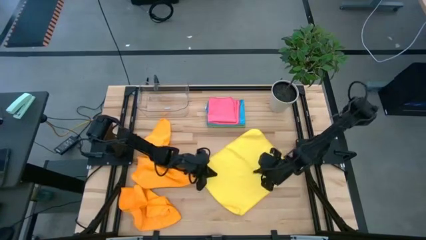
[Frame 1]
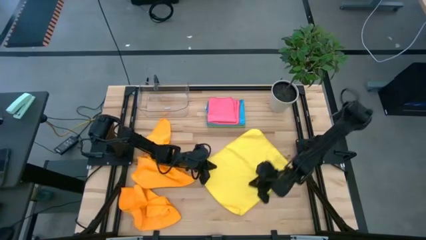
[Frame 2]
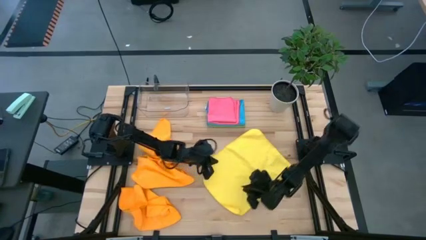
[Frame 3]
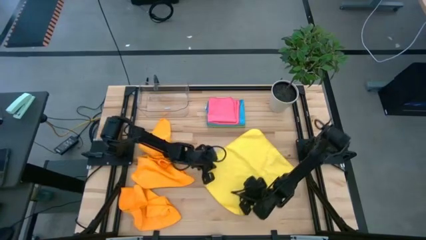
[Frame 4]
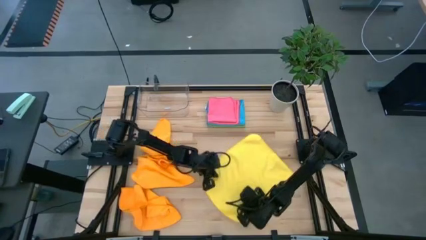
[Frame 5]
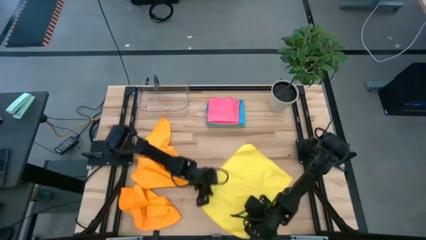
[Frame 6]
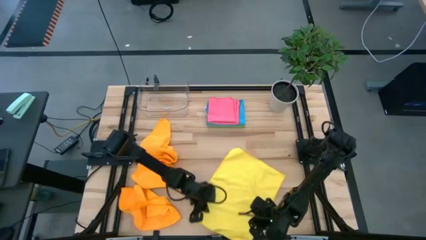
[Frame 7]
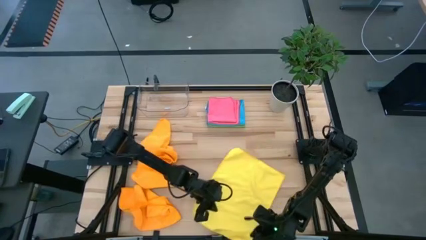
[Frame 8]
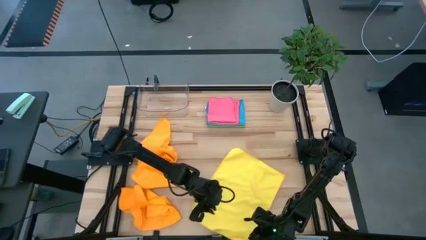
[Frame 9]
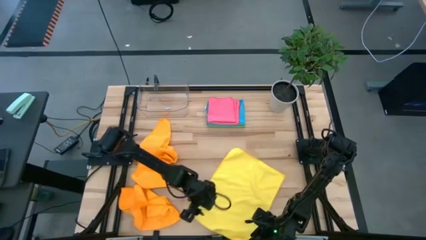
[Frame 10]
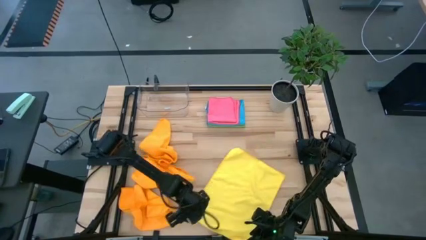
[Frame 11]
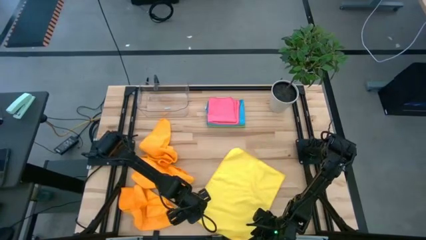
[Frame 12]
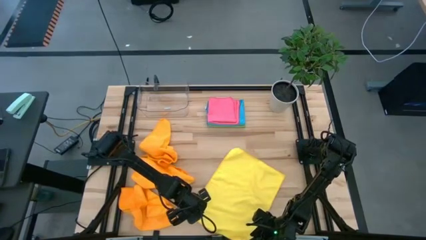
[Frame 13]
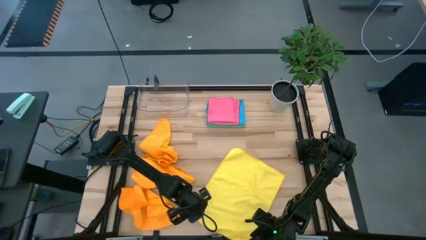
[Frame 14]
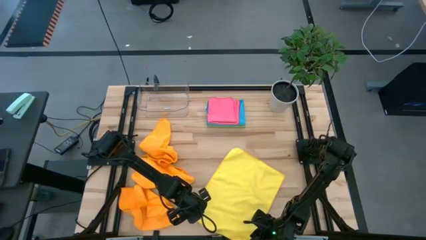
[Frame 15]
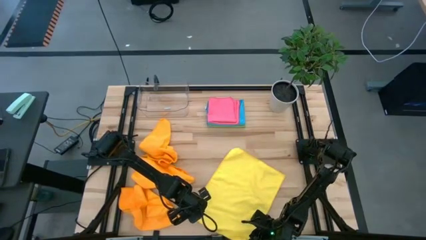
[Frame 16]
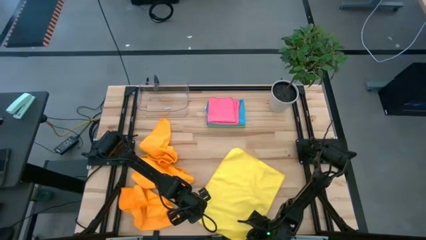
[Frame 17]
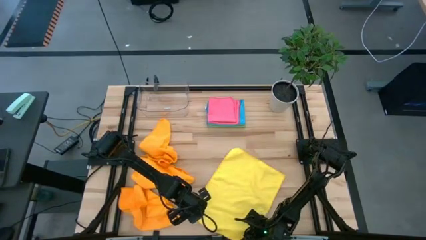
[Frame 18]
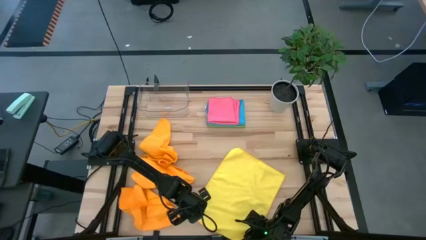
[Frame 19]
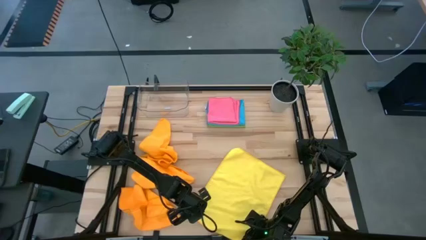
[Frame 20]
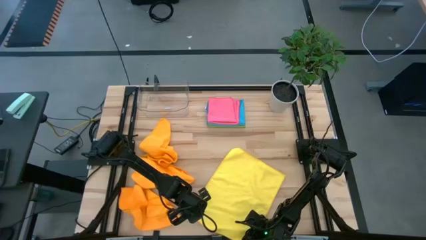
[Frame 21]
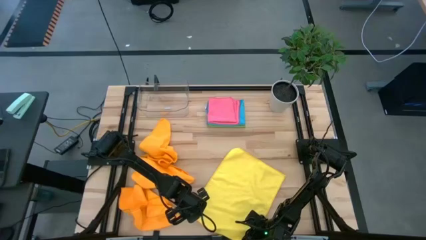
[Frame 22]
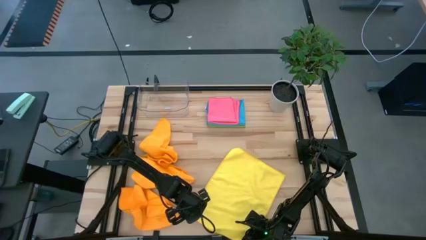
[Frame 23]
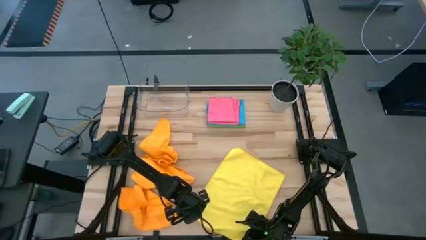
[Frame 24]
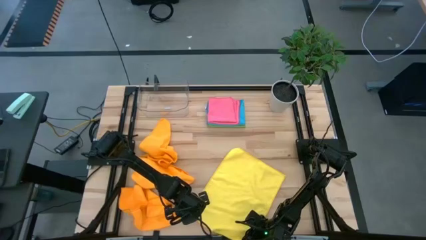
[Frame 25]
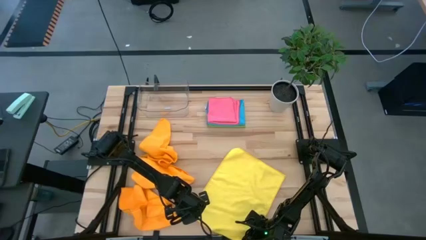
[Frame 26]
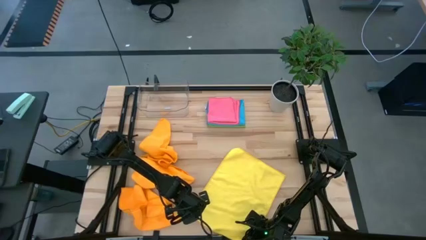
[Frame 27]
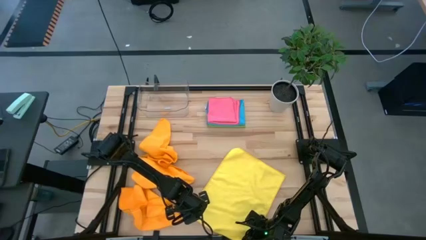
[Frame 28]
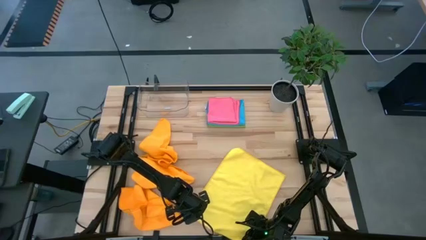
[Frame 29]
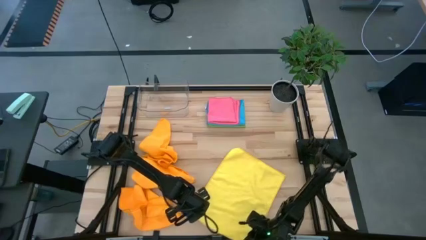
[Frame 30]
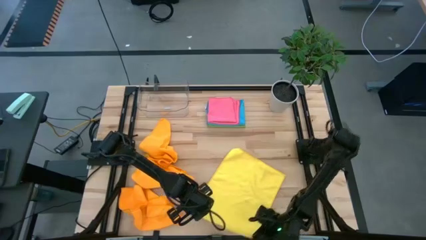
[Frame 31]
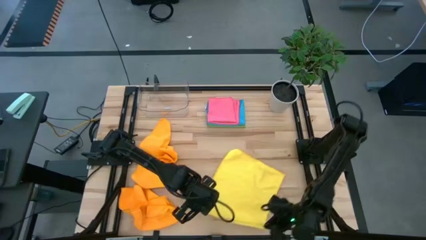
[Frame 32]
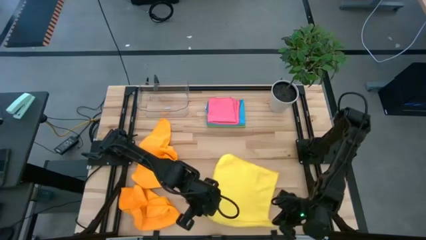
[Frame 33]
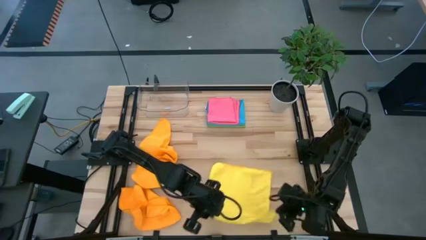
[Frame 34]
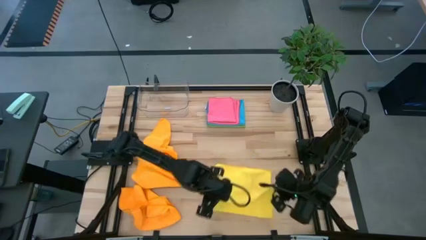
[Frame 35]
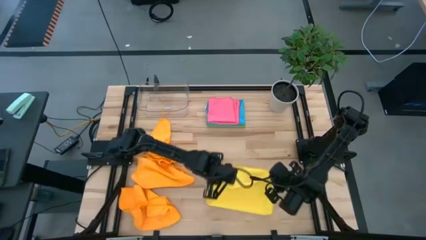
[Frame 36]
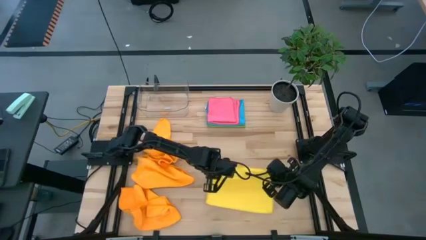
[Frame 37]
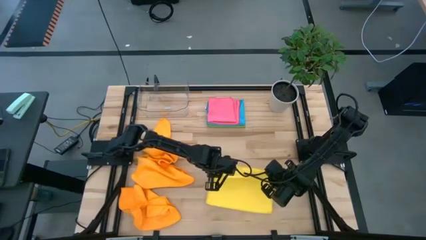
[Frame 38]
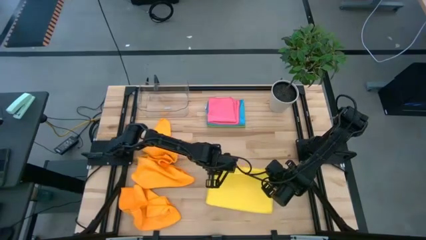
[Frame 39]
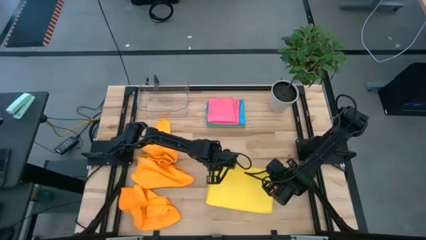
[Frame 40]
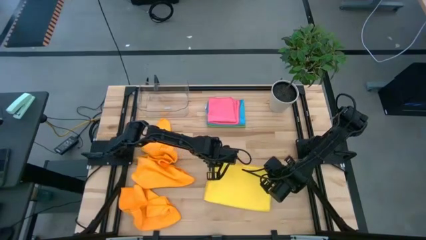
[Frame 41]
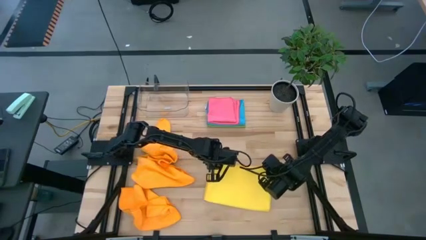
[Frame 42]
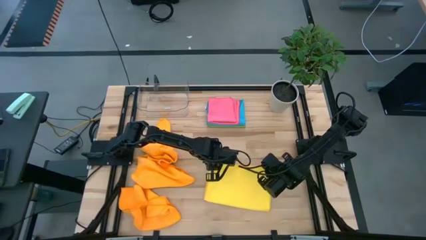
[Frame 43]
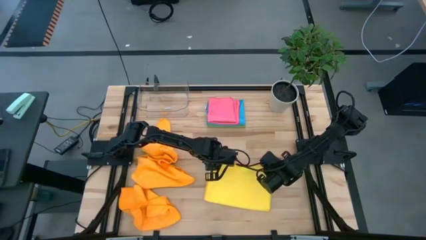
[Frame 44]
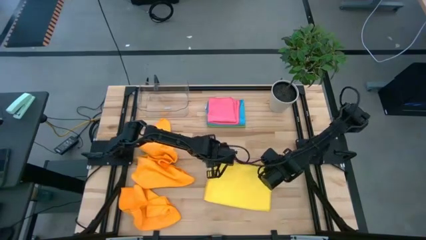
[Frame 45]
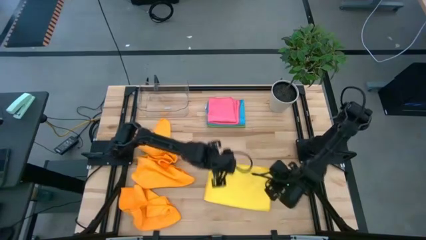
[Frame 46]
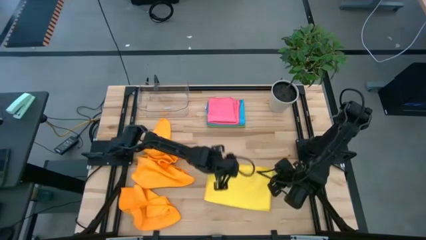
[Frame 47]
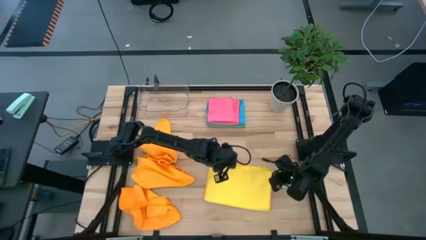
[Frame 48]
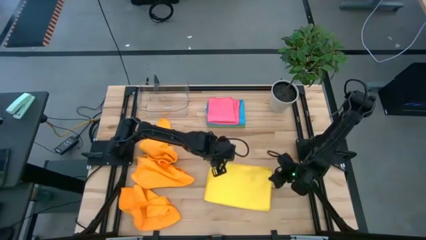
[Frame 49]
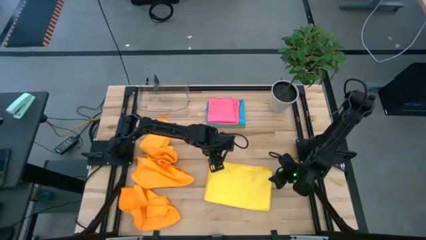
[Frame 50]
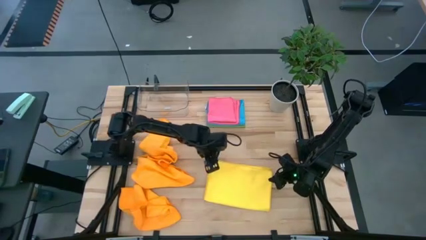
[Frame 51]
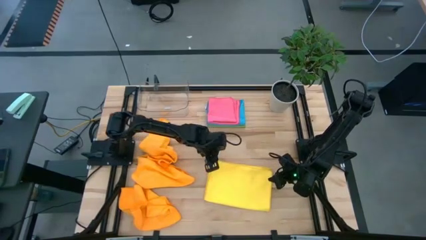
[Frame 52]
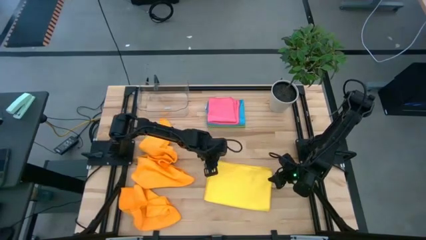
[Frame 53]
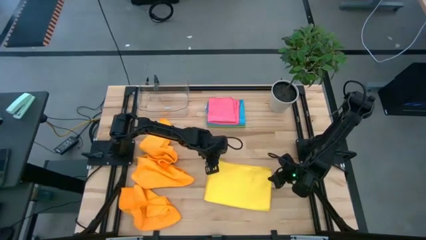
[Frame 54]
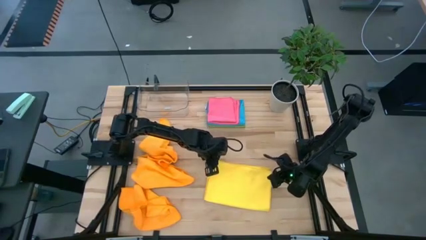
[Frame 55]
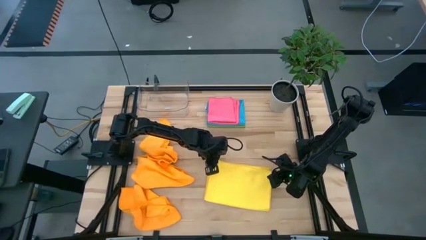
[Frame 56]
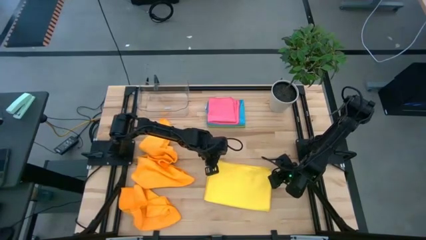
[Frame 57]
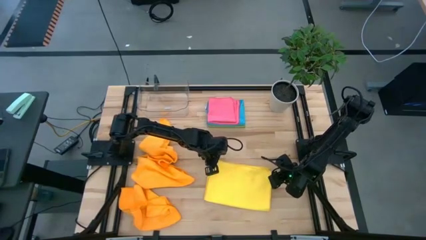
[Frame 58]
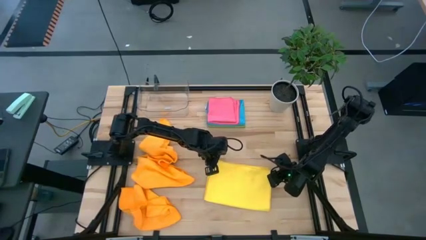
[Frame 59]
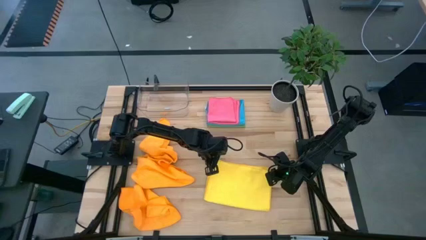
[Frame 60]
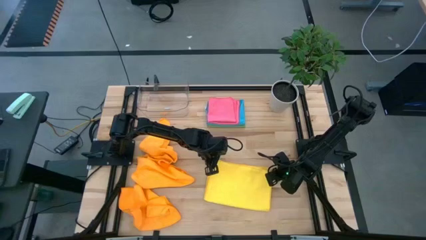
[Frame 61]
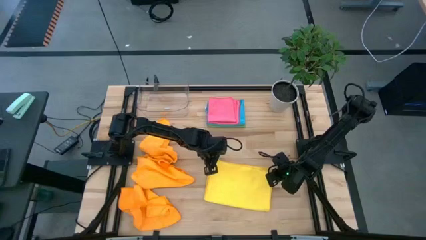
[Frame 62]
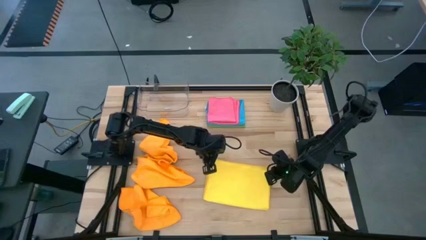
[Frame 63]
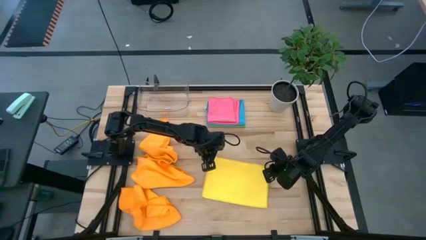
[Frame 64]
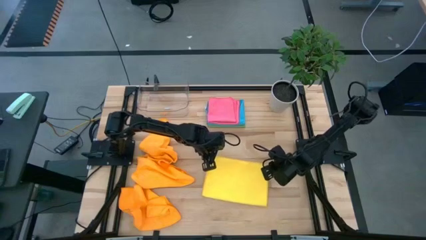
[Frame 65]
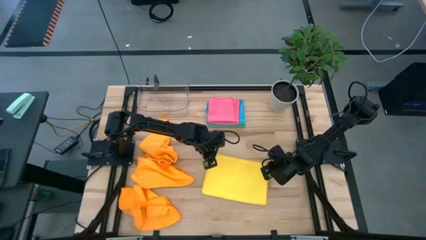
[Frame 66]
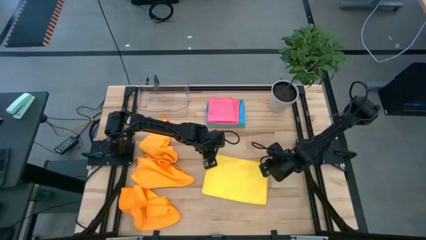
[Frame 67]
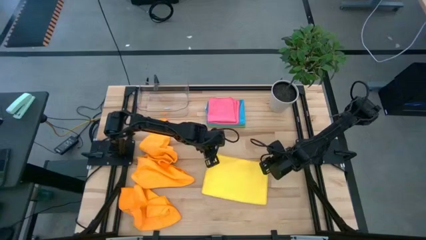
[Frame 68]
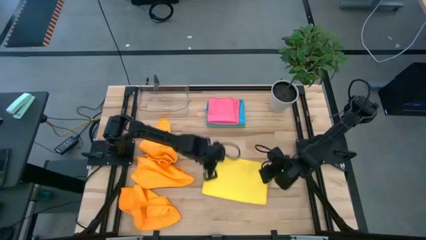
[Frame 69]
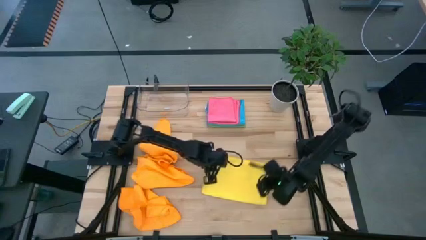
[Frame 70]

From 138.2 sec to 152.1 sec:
Task: Fold microfiber towels
Fold the yellow towel

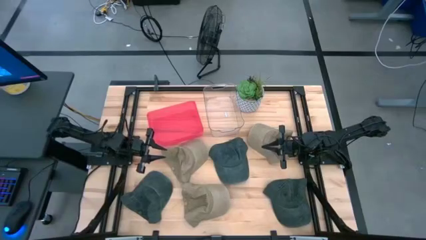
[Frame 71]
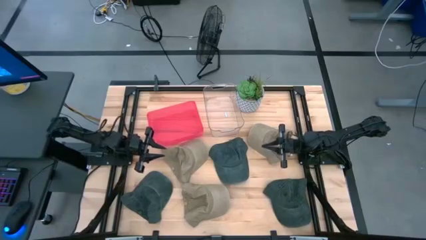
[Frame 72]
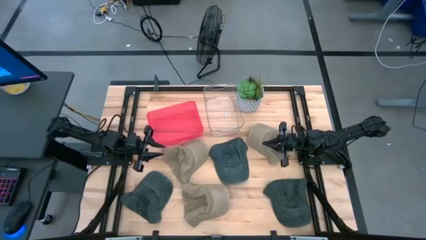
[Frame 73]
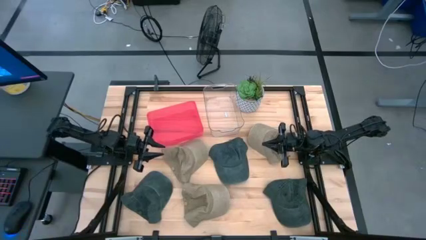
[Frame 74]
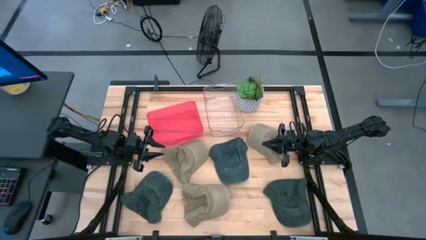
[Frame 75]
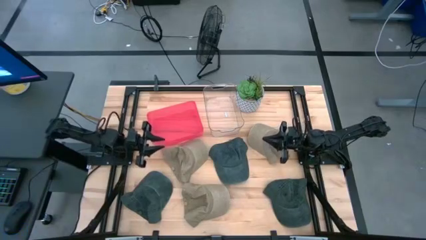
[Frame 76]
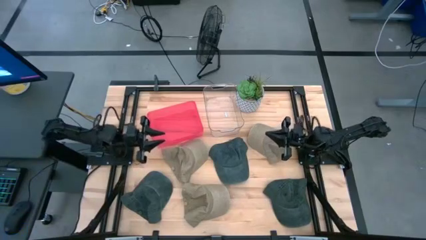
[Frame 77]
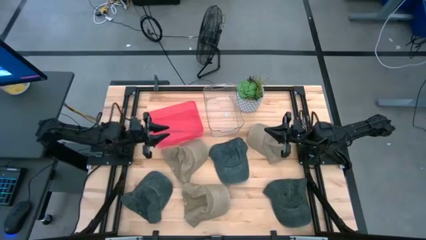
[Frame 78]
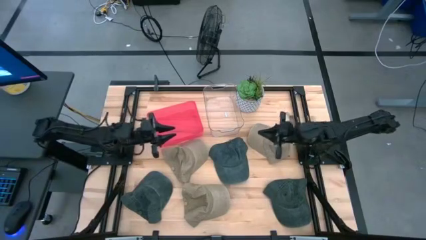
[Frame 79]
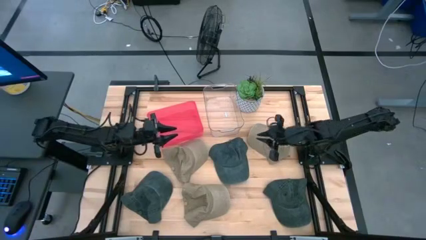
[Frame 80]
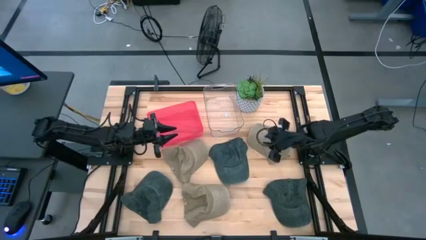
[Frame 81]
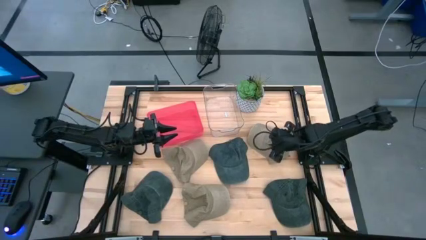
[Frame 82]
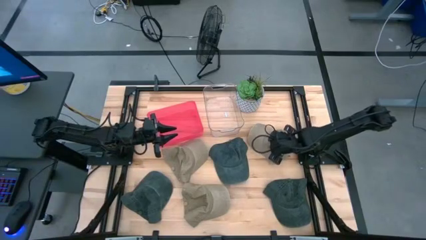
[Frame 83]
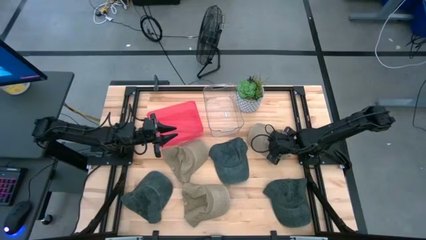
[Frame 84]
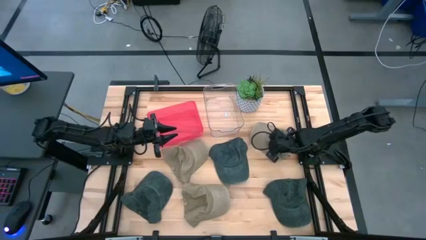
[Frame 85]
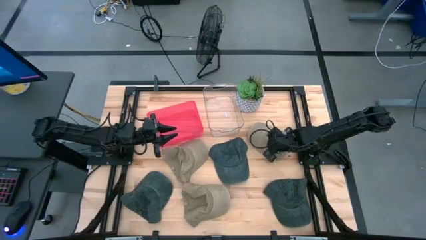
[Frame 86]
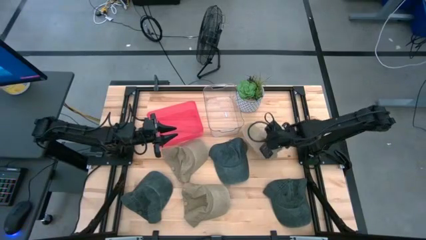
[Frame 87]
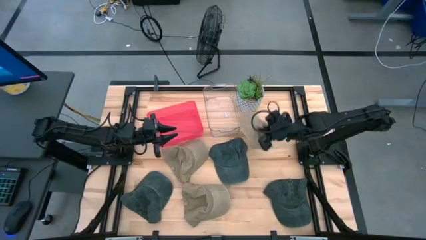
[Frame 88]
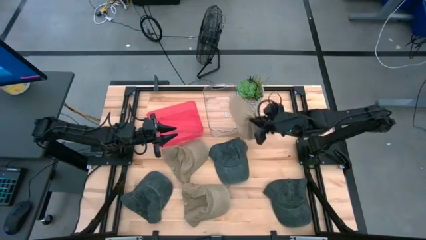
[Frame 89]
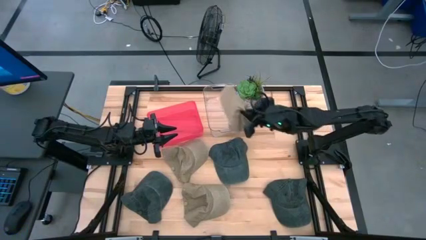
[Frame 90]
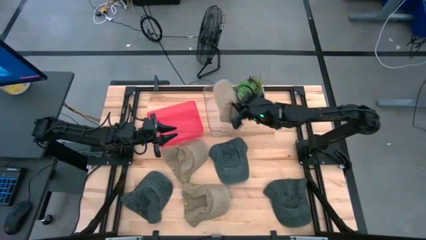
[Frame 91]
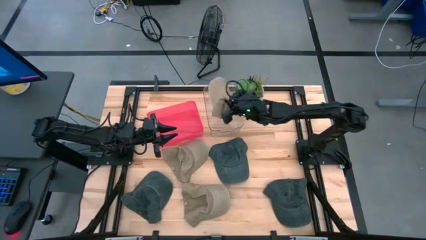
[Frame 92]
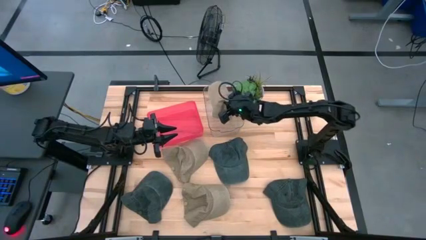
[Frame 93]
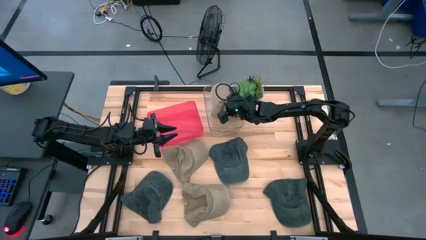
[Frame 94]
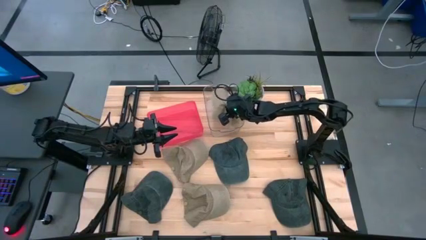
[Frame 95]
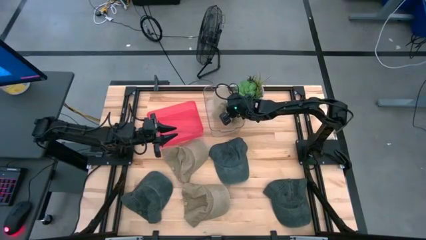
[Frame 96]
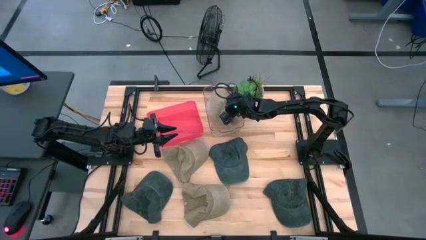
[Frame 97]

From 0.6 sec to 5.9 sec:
Task: Pick & Place hat
Put the top right brown cap into the transparent bin
